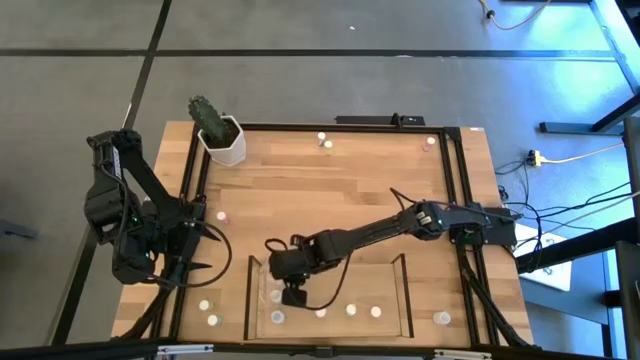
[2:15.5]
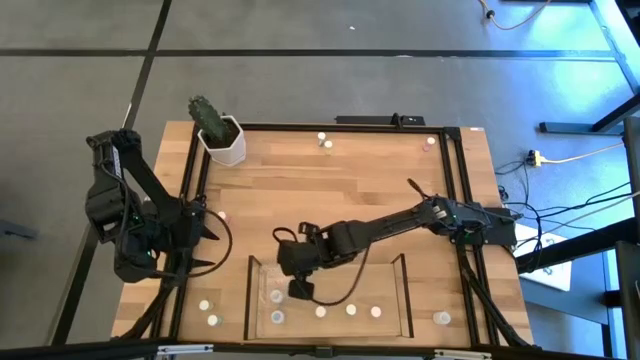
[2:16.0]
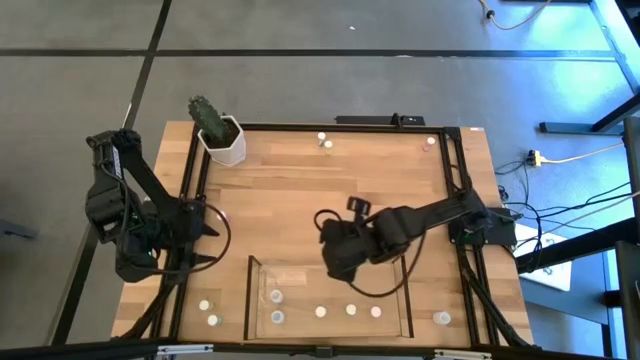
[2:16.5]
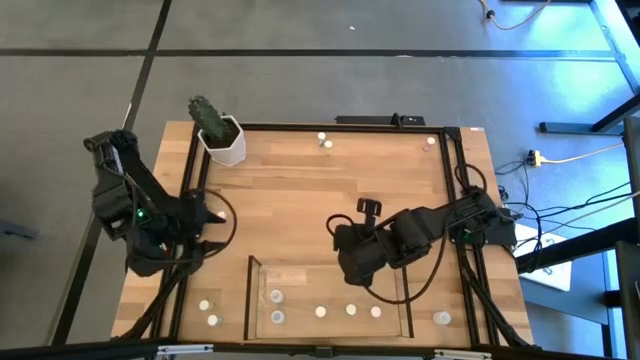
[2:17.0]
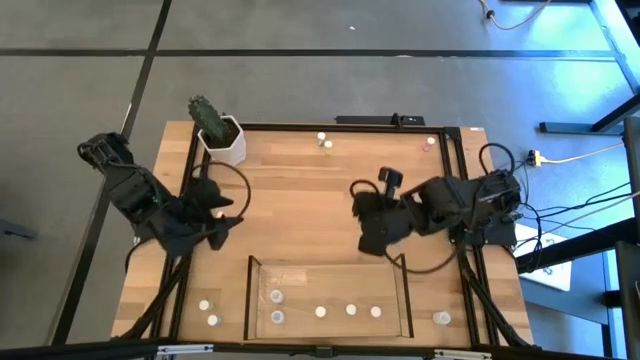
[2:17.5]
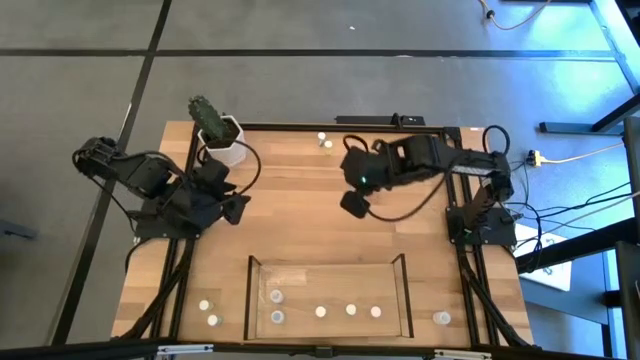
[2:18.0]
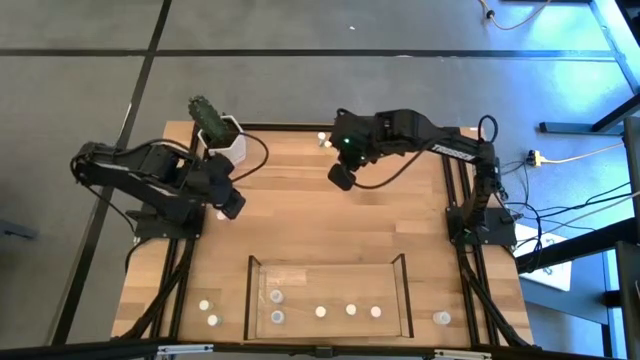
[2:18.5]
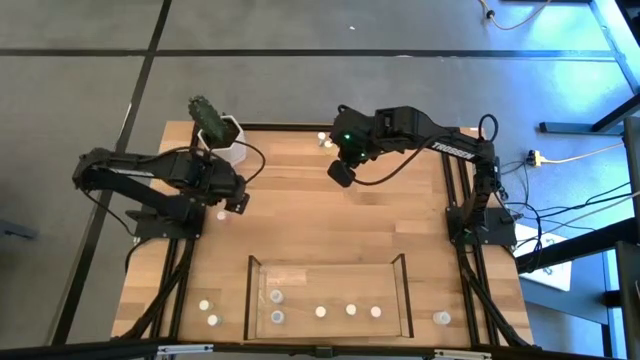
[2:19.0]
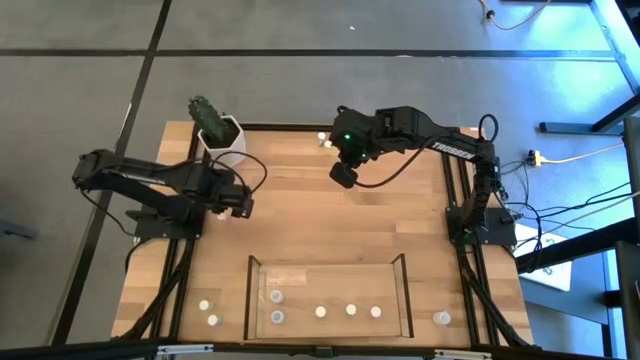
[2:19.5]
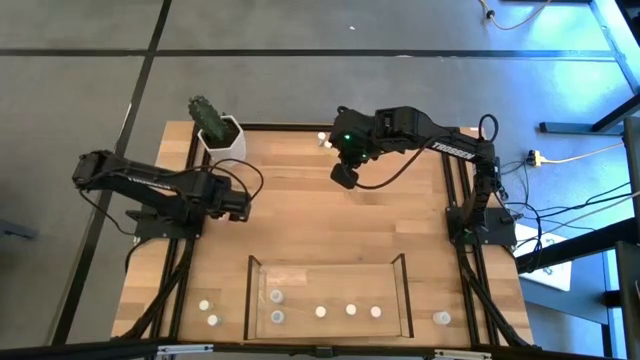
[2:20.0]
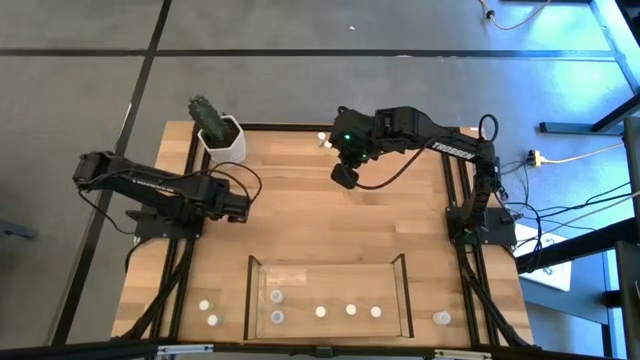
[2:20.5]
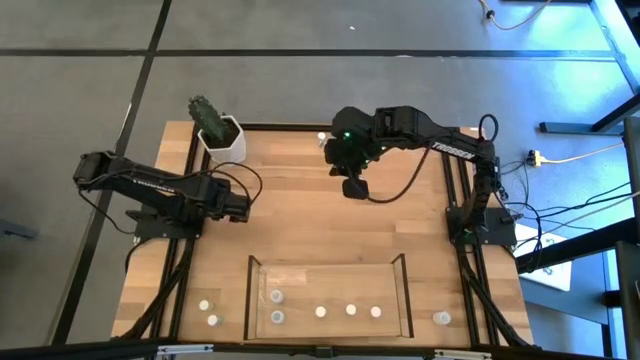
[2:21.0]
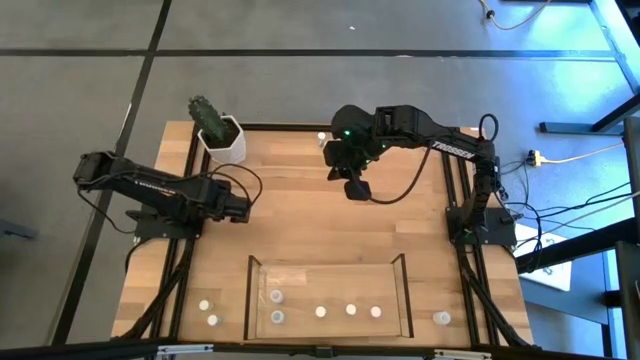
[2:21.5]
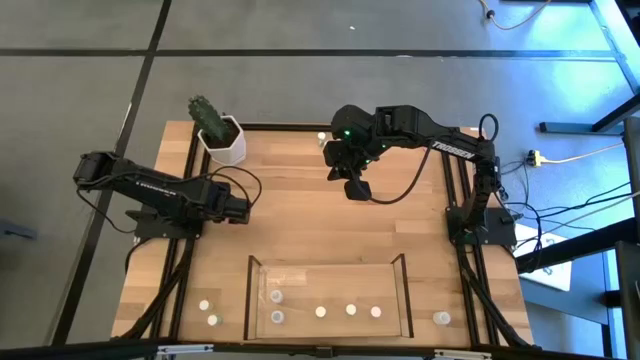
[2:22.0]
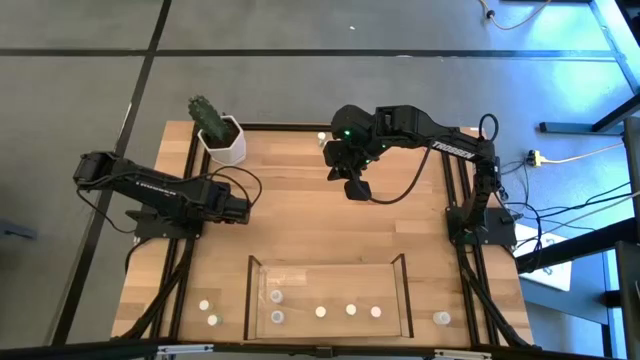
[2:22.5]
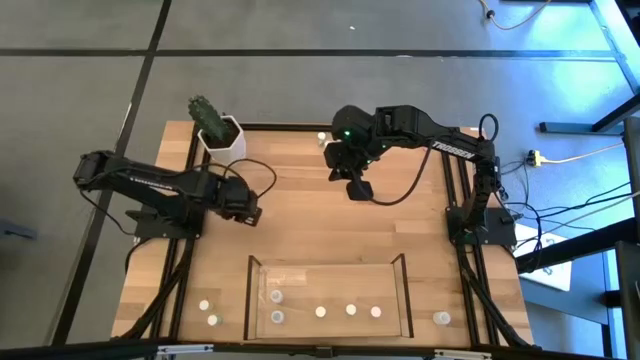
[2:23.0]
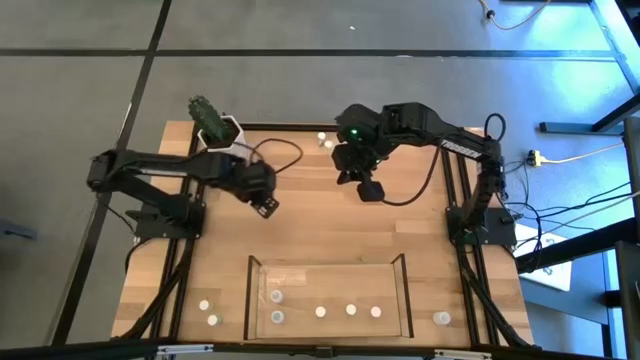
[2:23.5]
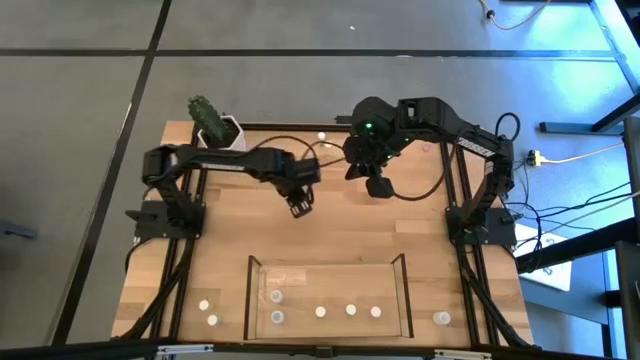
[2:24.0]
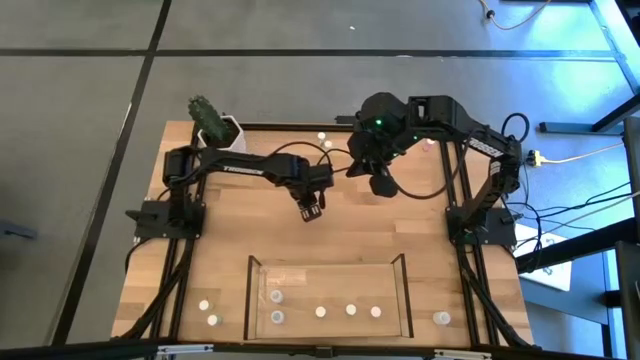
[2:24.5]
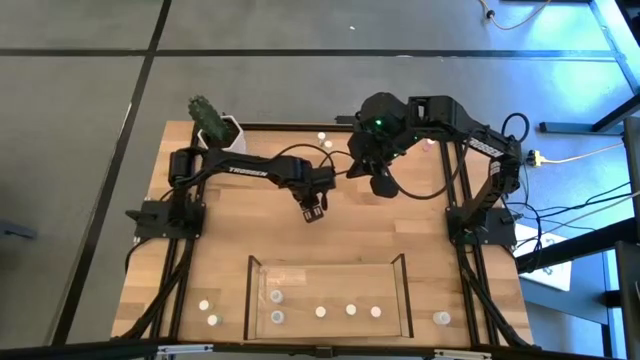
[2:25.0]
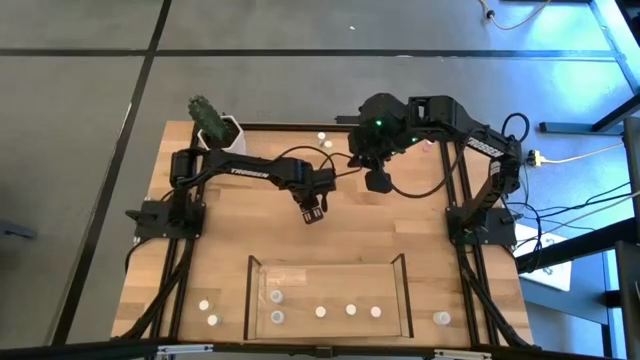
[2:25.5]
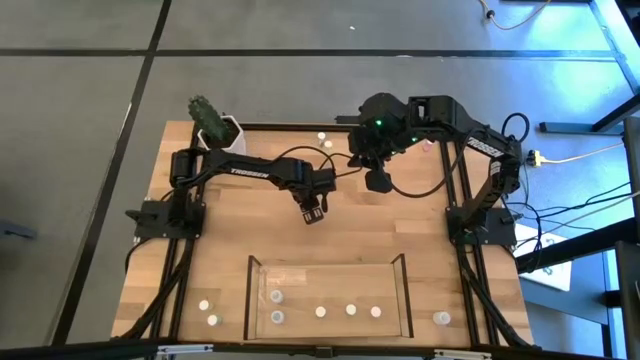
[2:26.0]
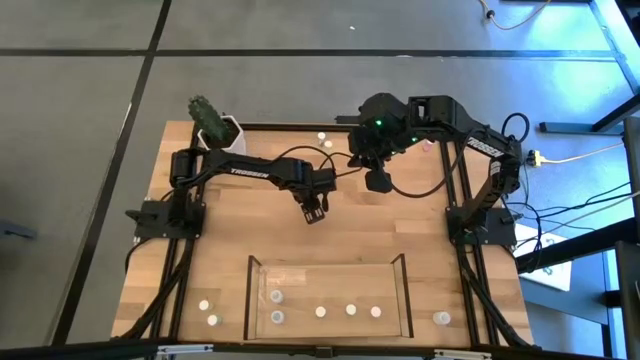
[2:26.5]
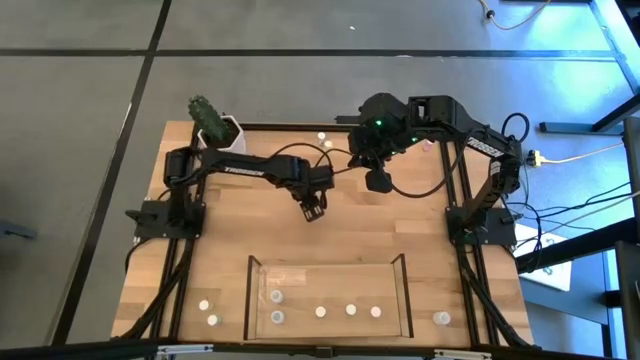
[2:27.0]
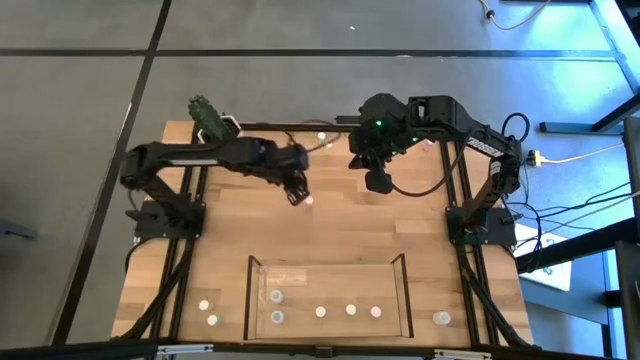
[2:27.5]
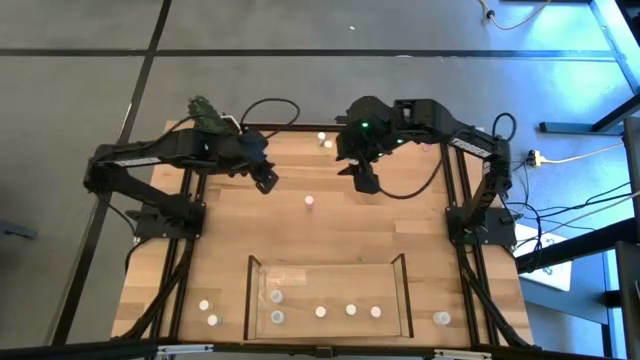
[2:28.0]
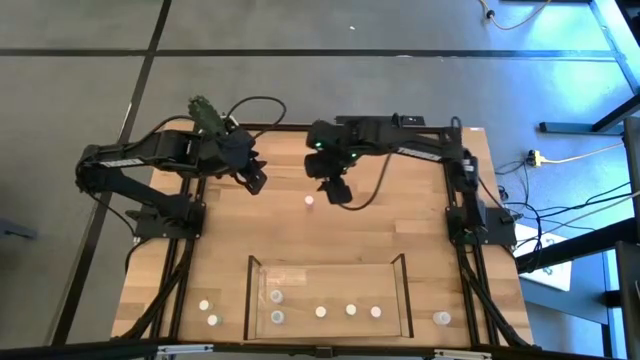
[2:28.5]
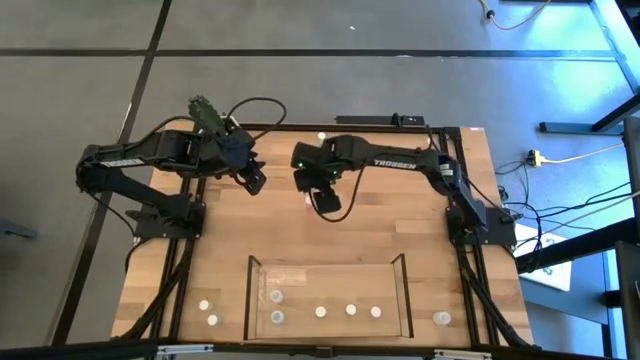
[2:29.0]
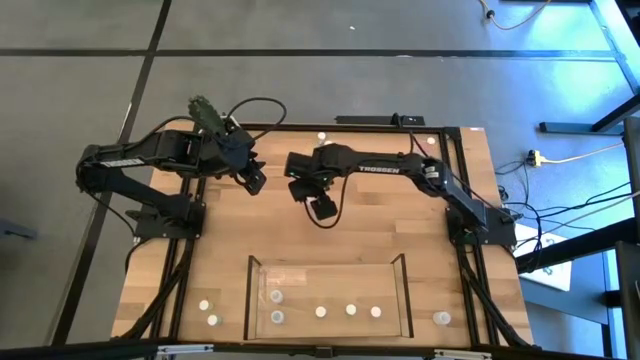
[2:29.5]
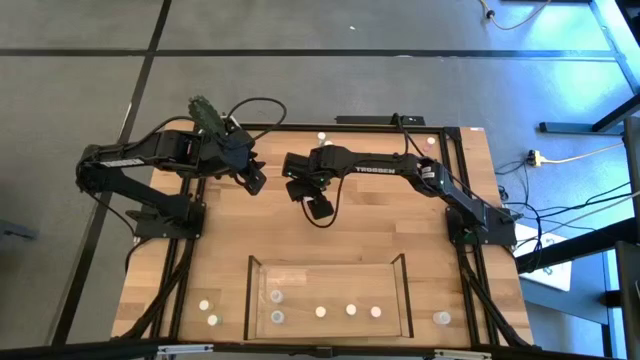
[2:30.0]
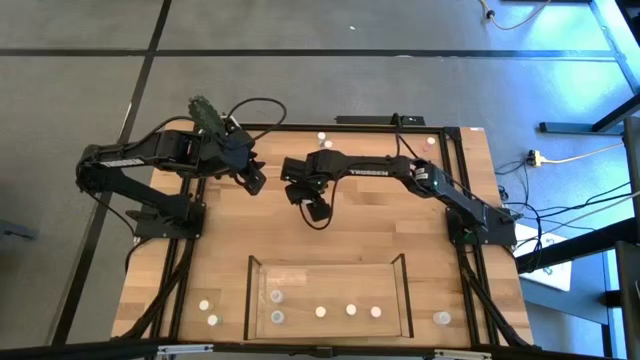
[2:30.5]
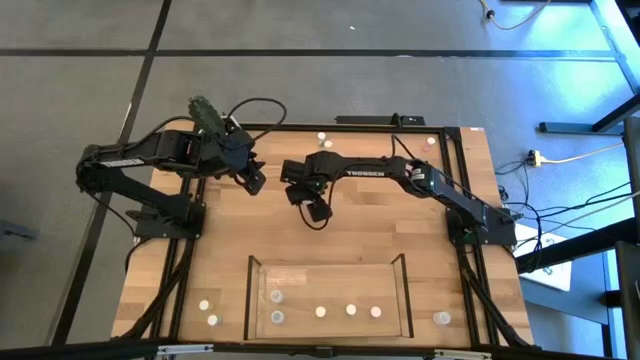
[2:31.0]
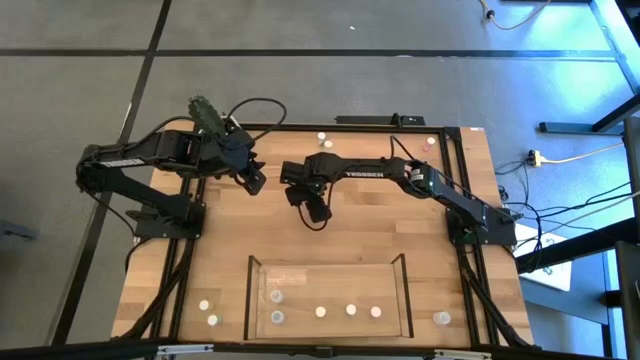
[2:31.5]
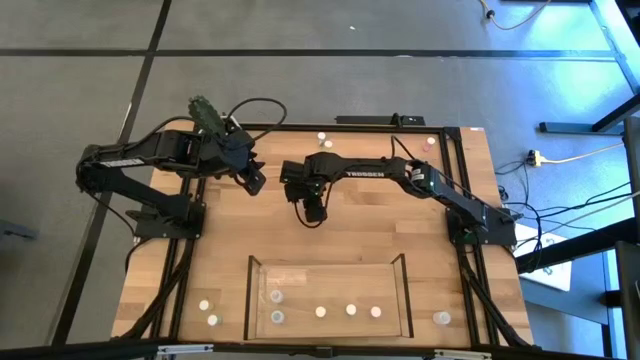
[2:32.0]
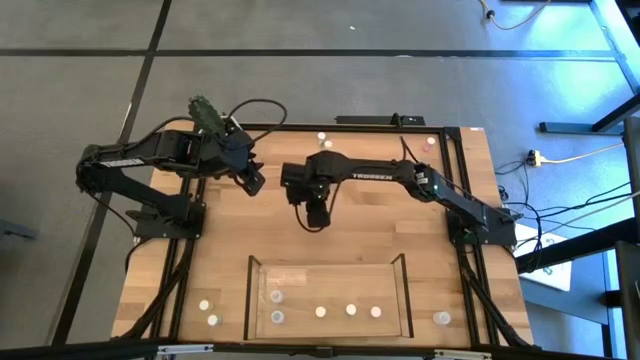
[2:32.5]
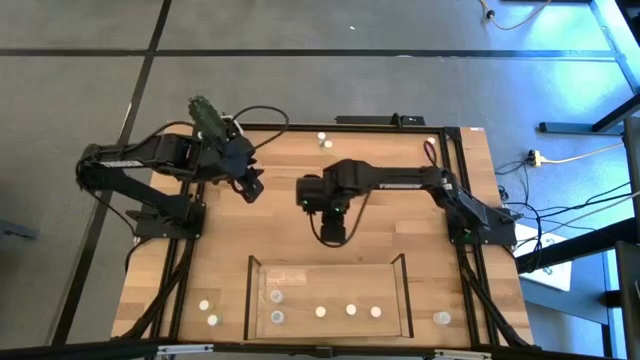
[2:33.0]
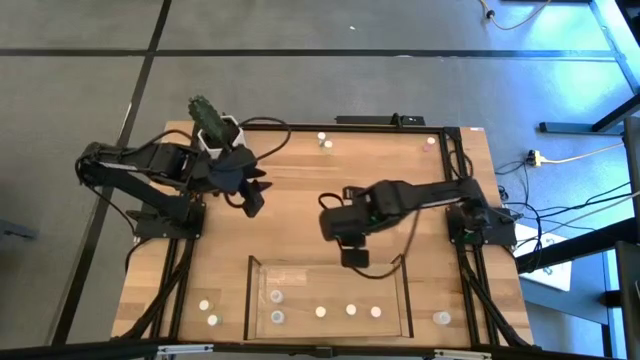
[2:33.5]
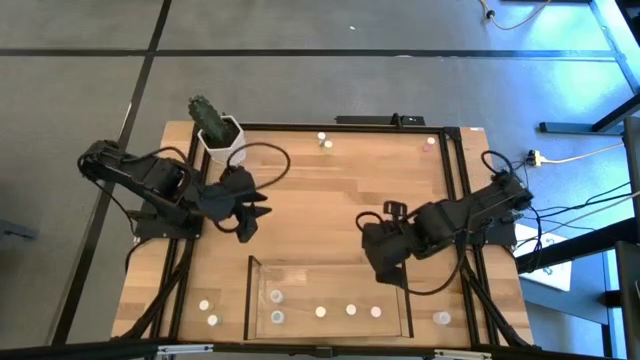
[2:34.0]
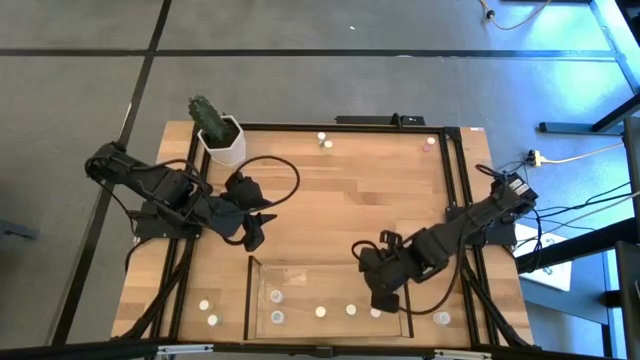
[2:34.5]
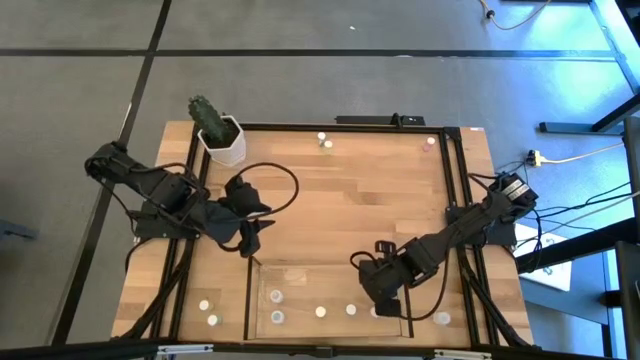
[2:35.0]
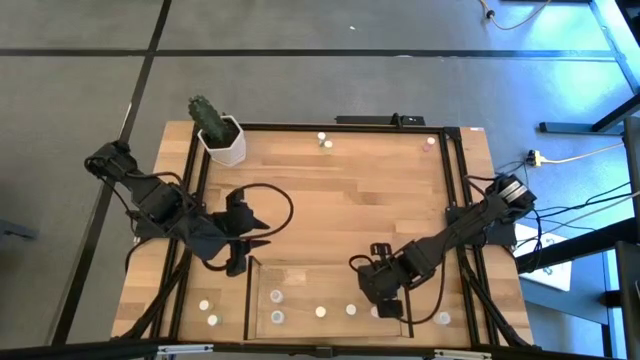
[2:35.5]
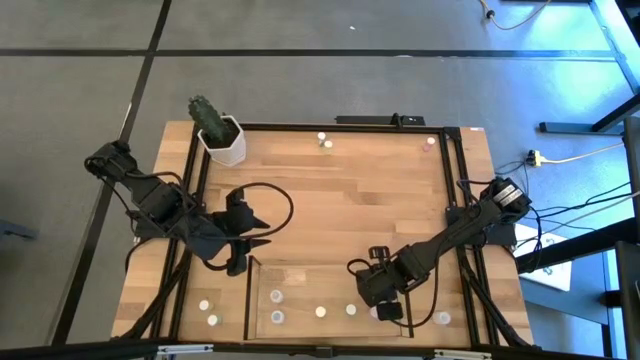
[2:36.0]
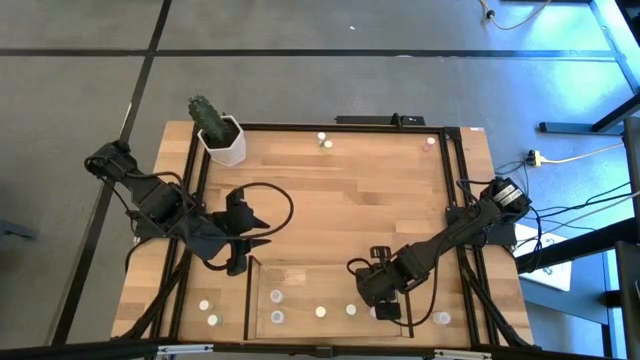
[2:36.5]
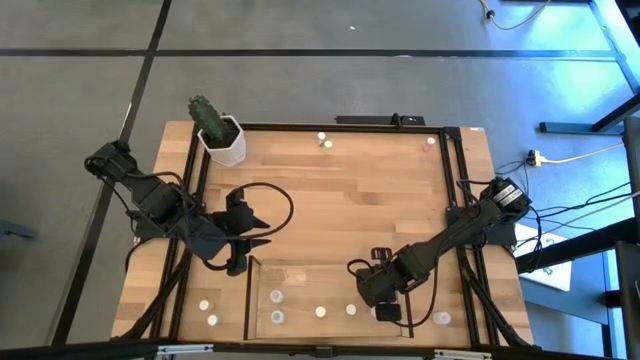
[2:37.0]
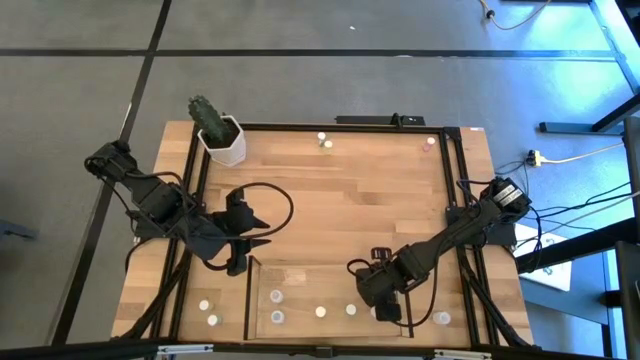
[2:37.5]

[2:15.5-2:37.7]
Task: Pick and place medicine bottles onto shelf by color
Put the left pink pill bottle on the shelf aligned with the other pink pill bottle
